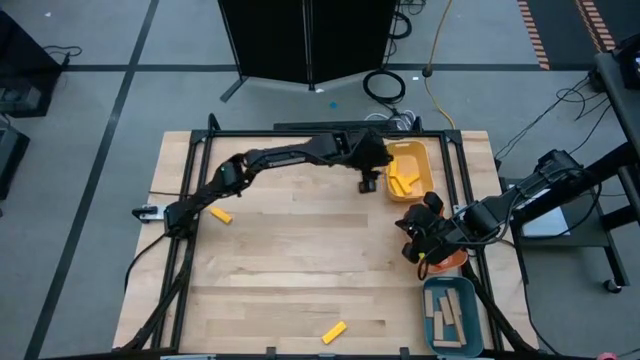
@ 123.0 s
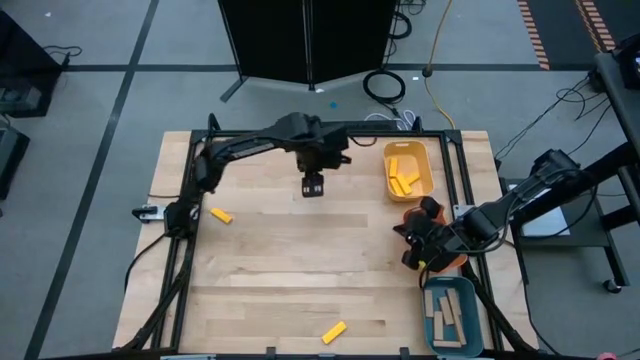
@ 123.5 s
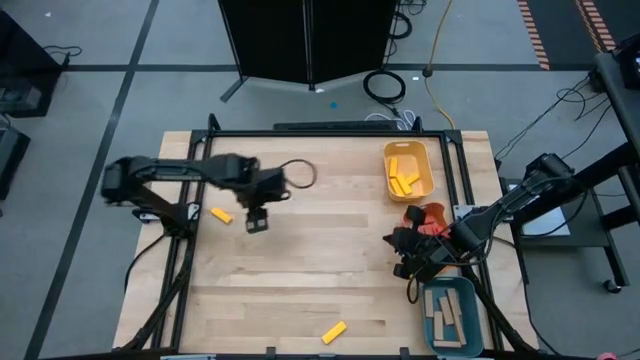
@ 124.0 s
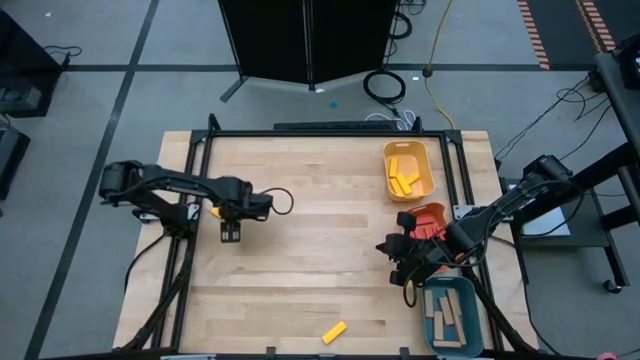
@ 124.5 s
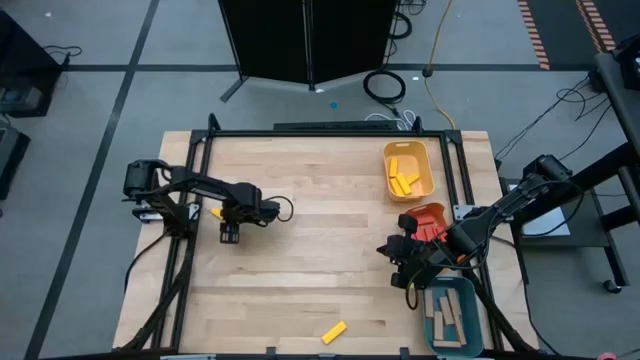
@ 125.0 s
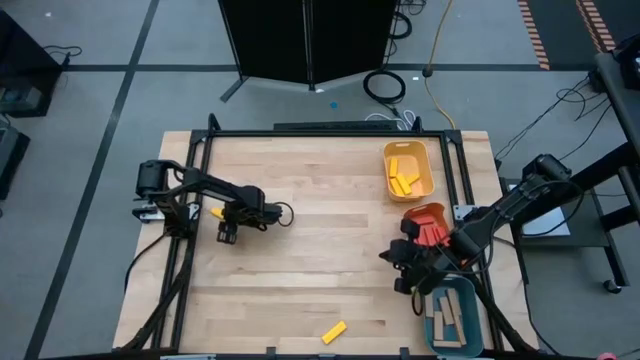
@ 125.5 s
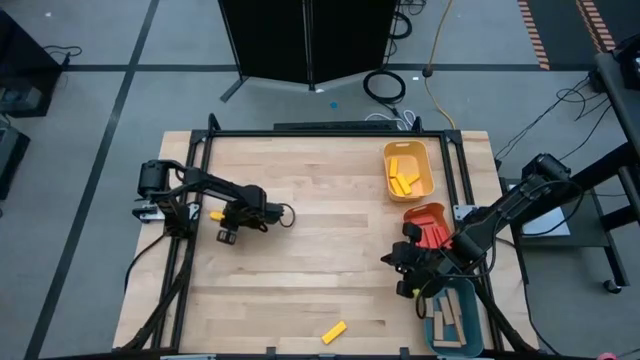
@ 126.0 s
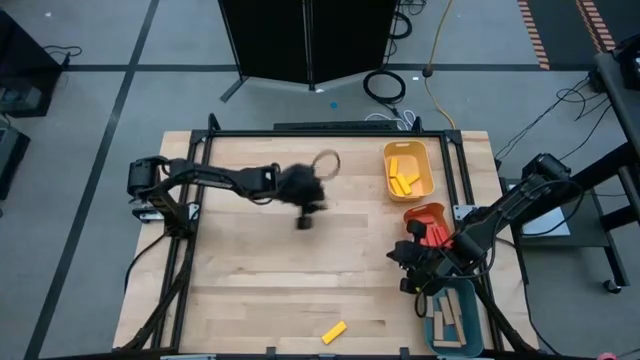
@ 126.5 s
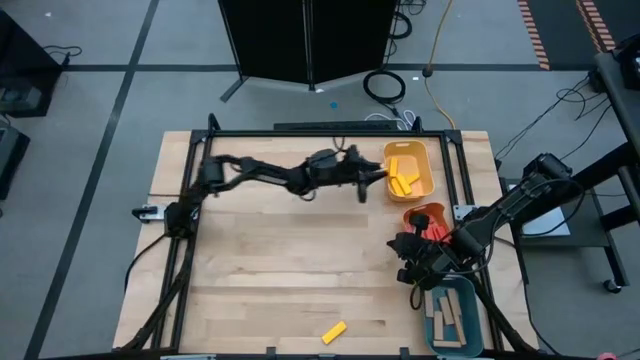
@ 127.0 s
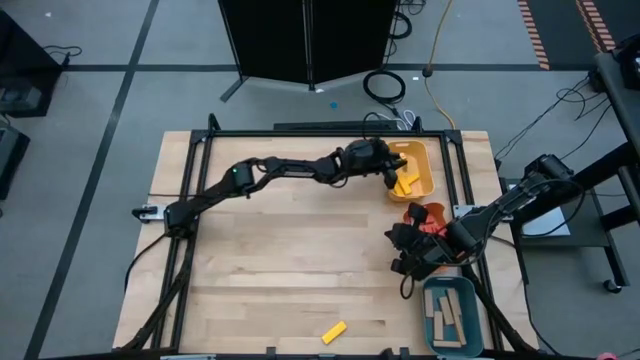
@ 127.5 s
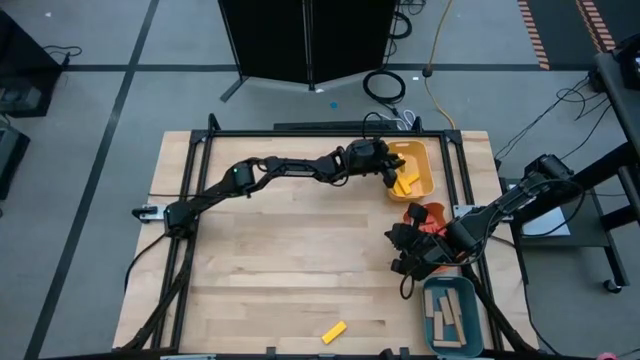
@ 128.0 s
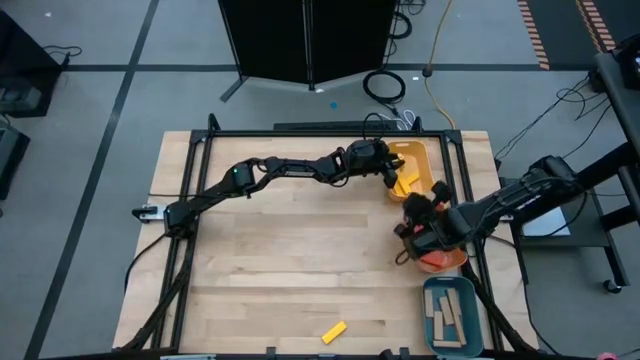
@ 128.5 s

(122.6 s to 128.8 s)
Task: Sort blocks
Put the yellow block into the yellow bin

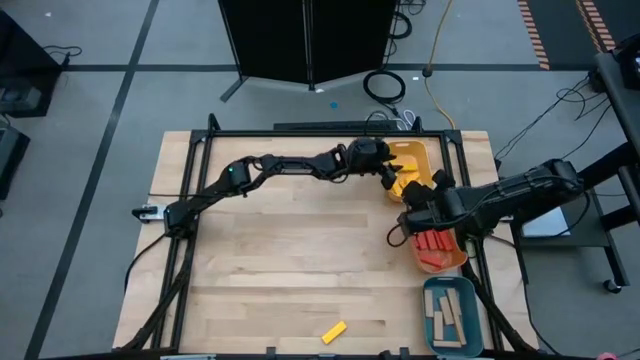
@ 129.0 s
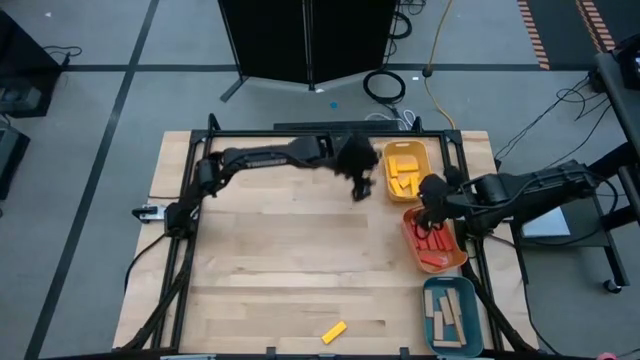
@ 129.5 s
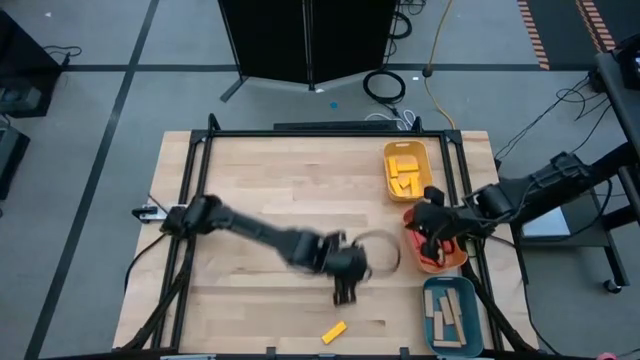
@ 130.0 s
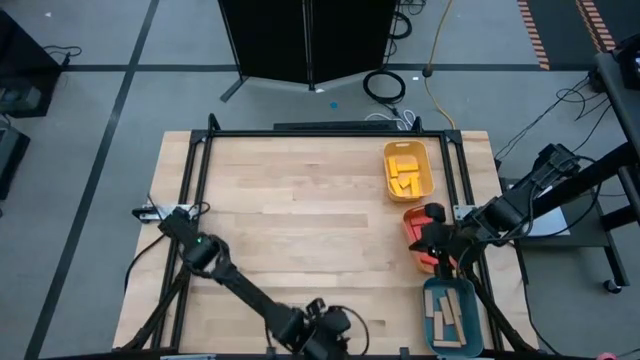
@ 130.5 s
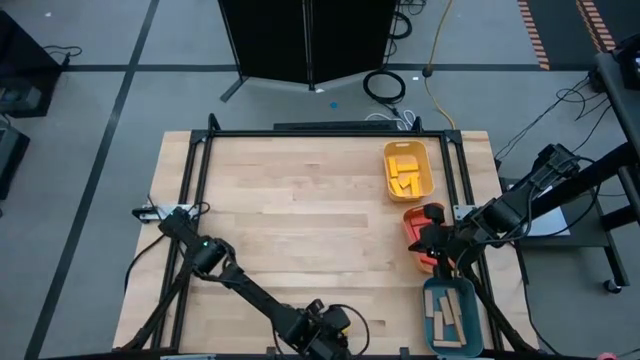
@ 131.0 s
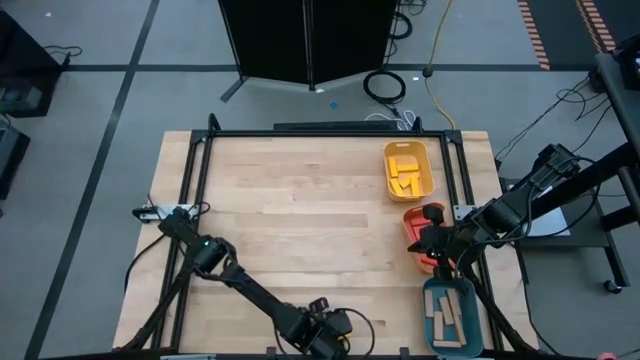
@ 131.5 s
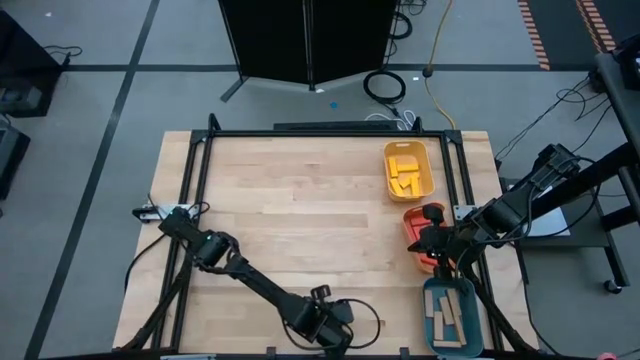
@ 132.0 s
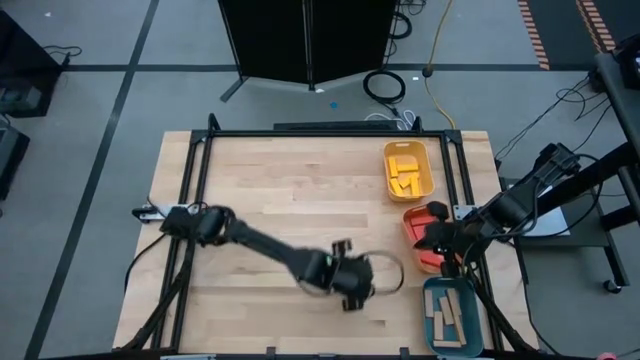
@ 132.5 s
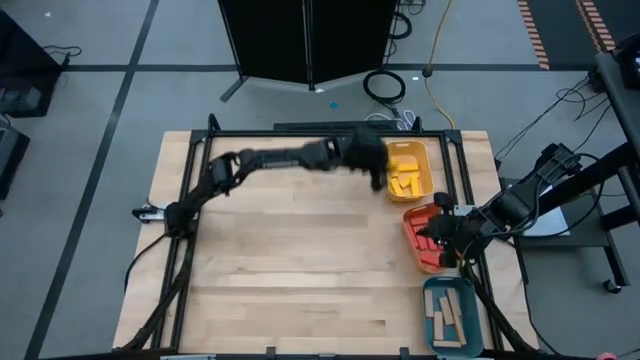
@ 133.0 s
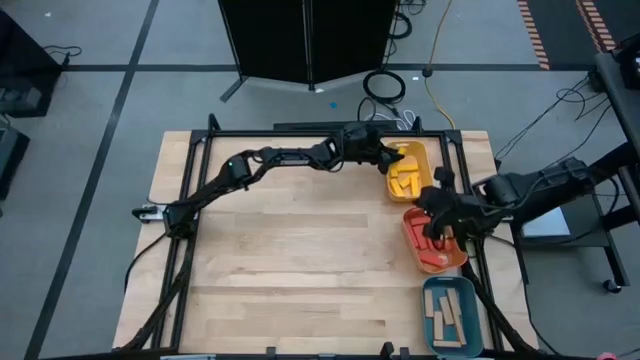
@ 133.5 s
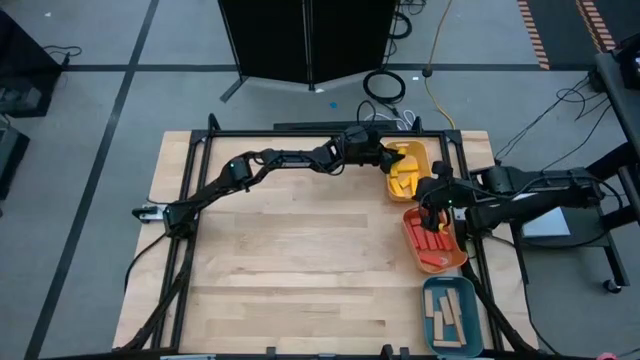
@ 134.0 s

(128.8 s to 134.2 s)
Put the yellow block into the yellow bin

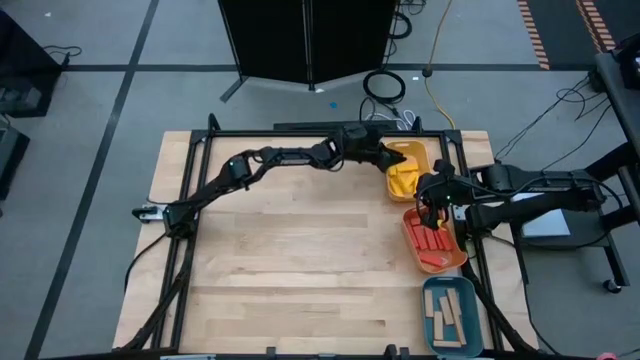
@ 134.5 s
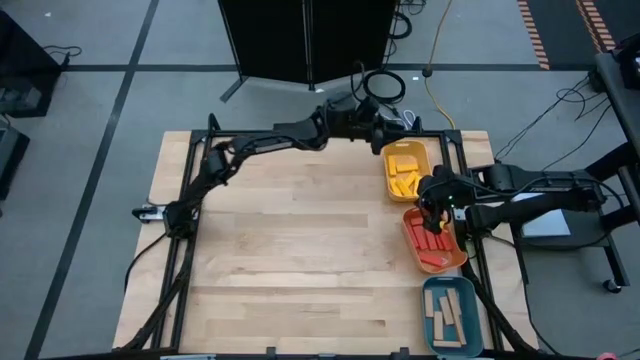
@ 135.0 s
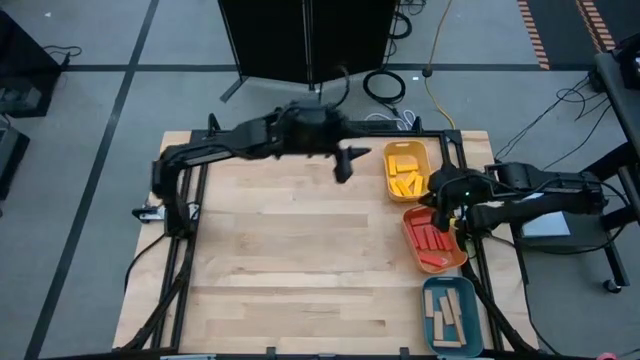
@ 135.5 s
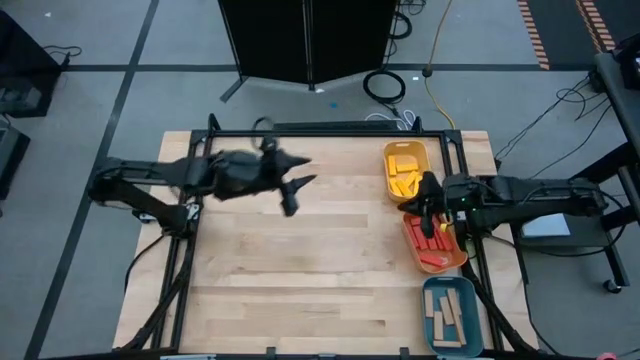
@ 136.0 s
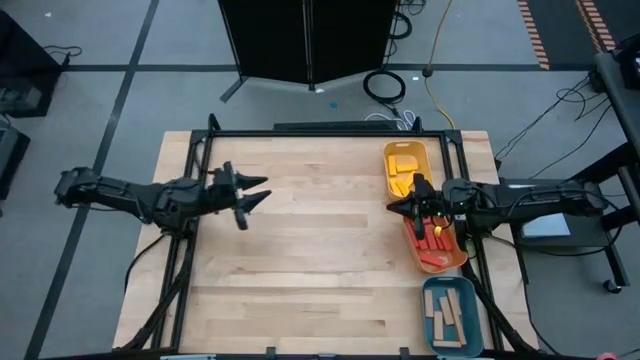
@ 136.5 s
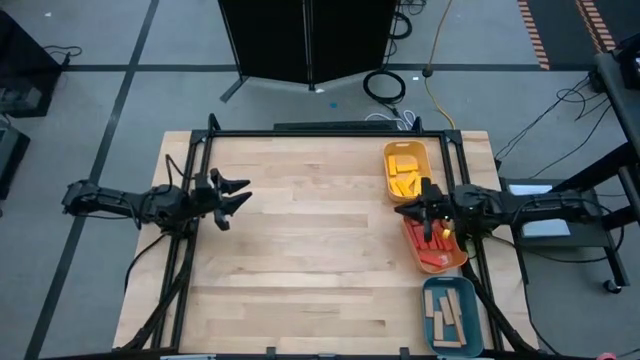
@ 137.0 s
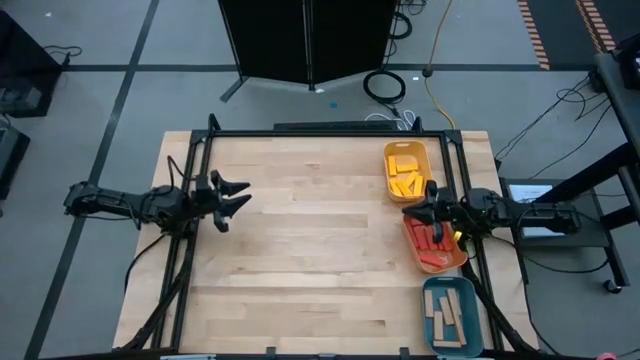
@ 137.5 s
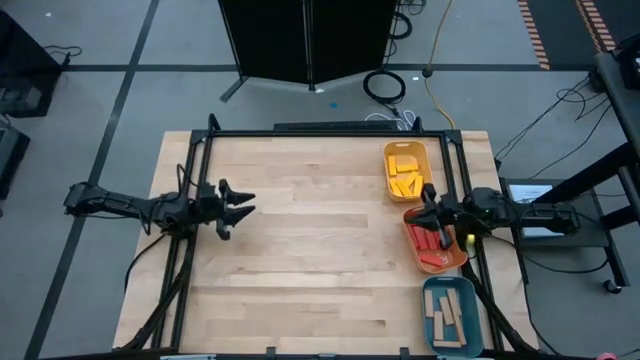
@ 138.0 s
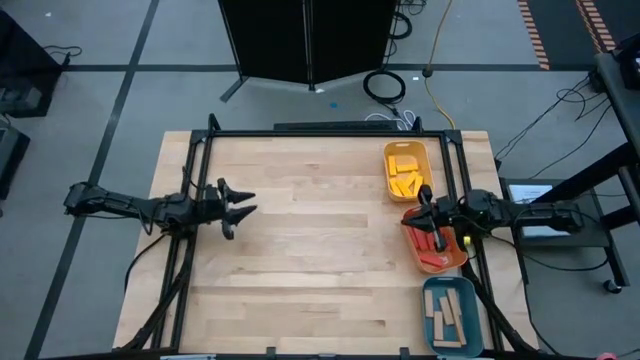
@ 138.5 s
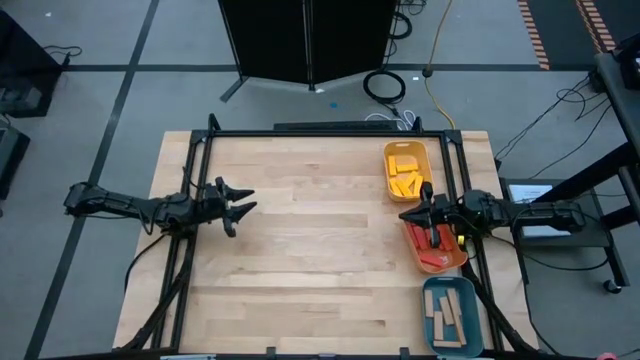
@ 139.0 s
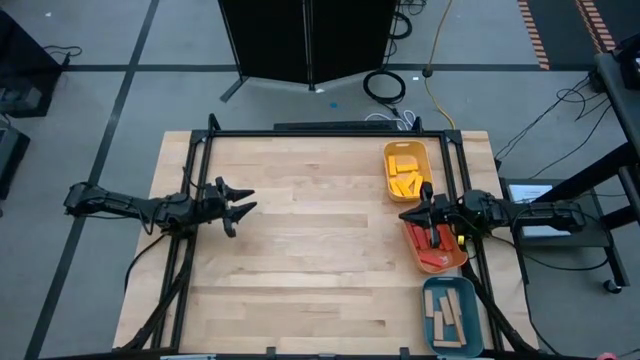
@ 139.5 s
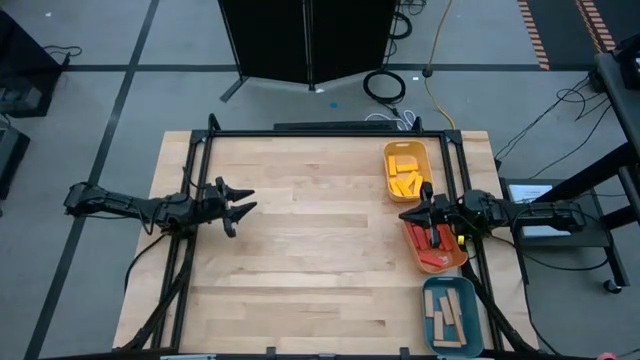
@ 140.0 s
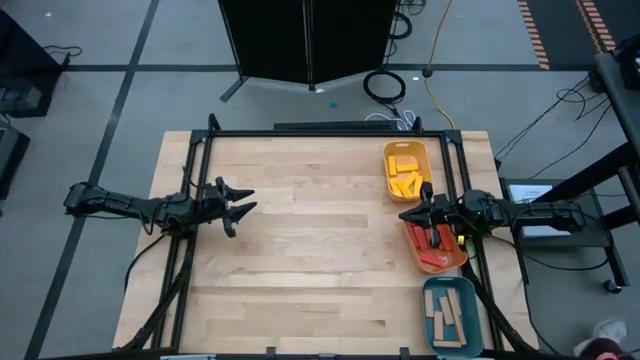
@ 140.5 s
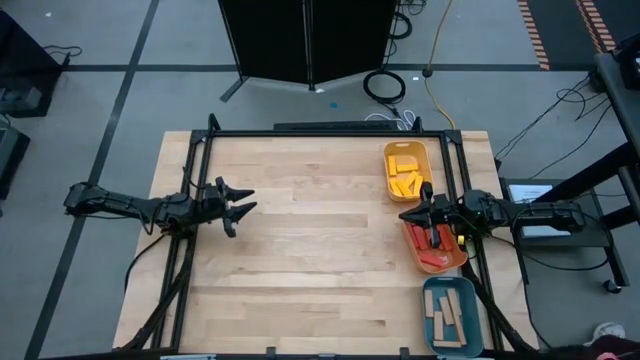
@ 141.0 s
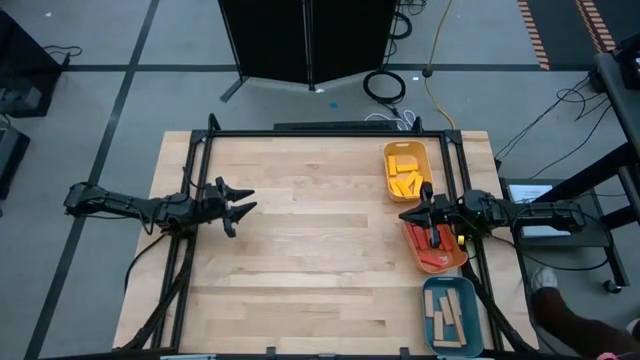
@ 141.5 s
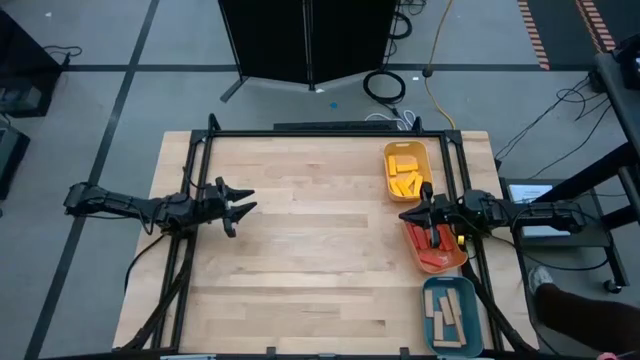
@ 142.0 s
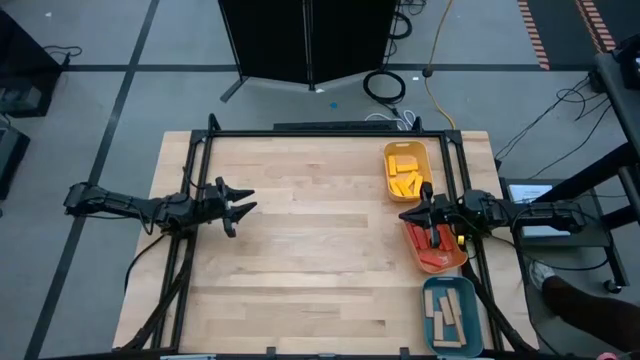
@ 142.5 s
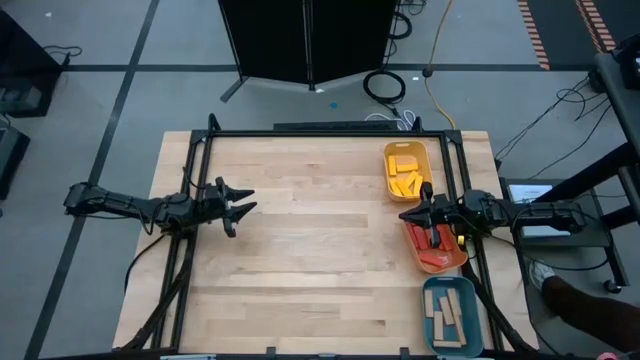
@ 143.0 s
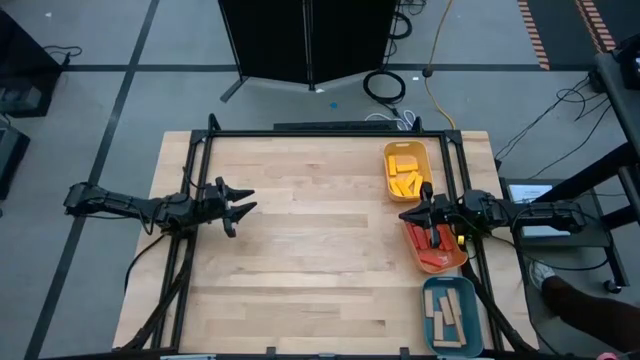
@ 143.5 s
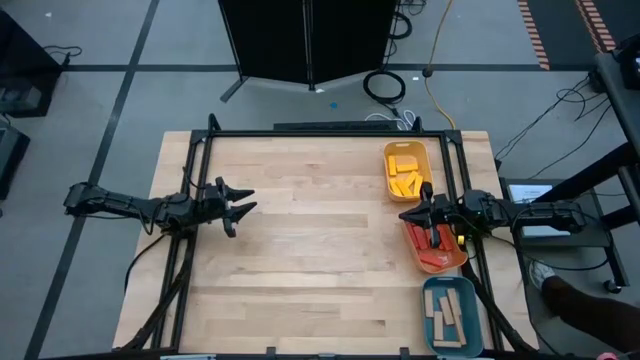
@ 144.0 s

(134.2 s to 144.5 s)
Return to Home Position
